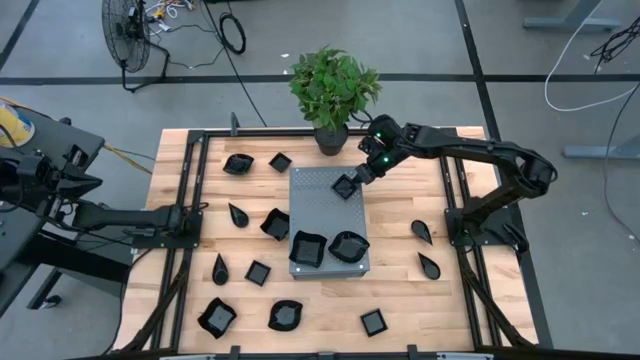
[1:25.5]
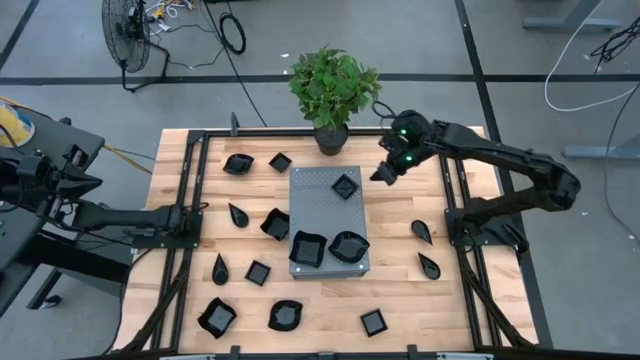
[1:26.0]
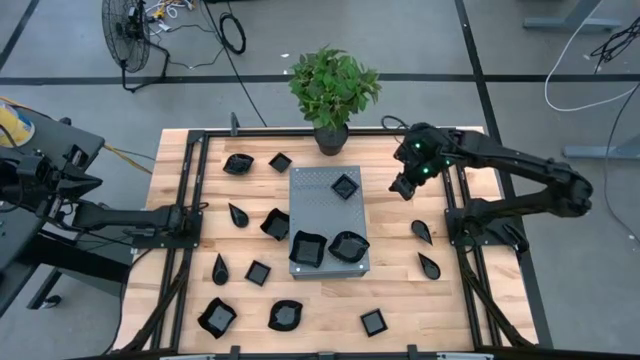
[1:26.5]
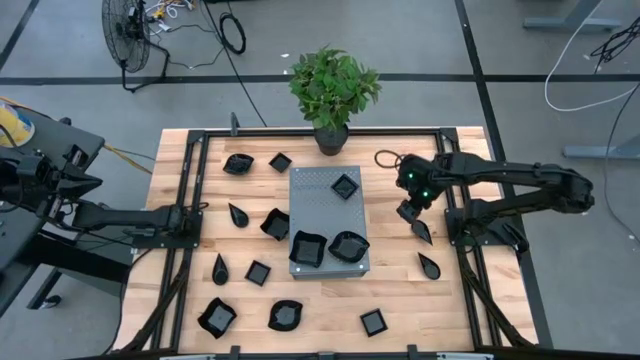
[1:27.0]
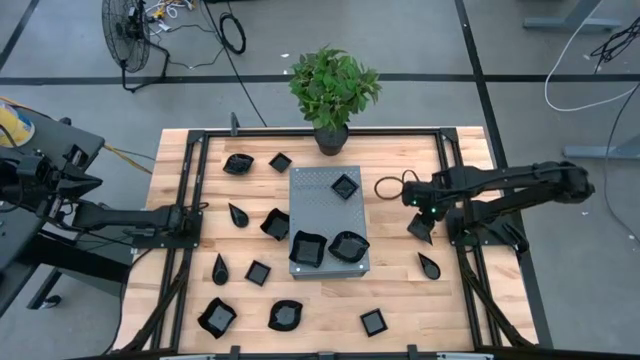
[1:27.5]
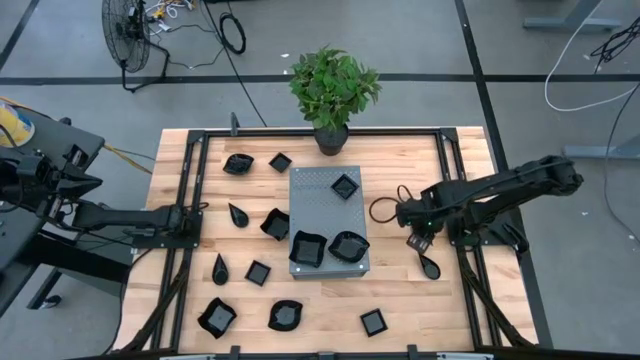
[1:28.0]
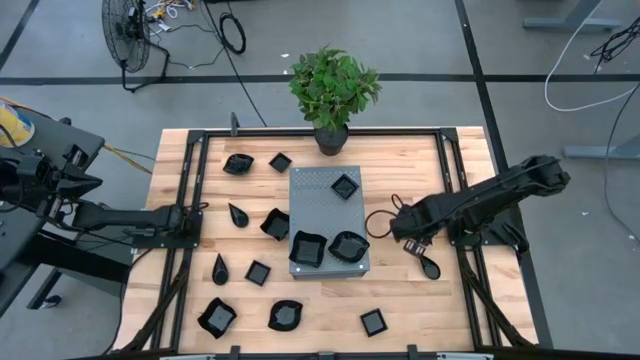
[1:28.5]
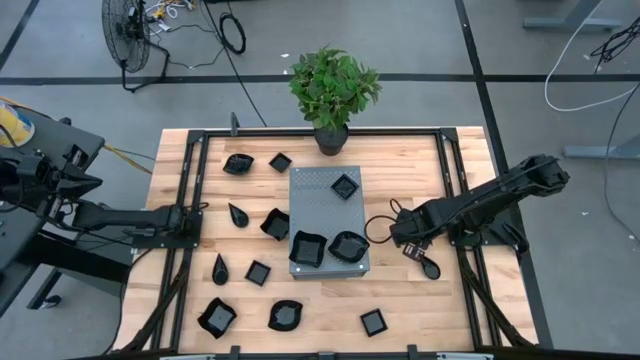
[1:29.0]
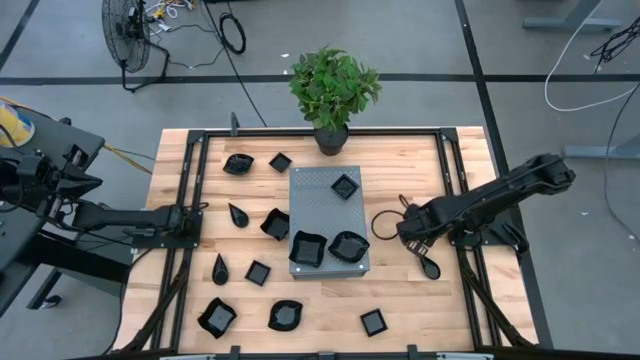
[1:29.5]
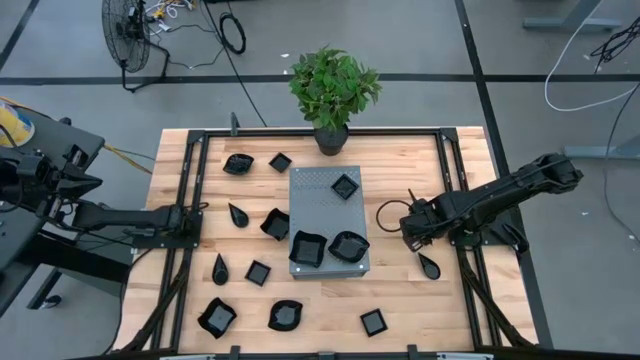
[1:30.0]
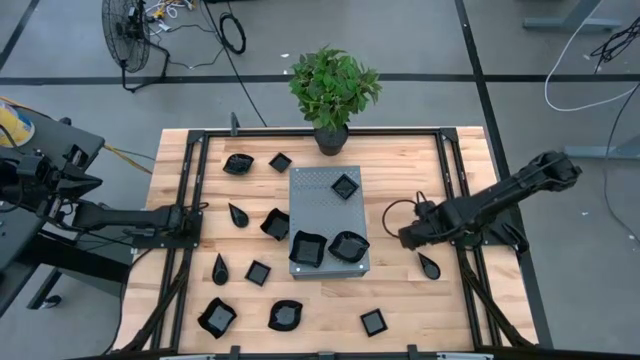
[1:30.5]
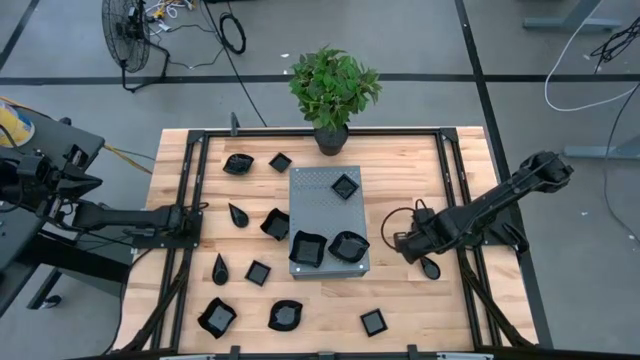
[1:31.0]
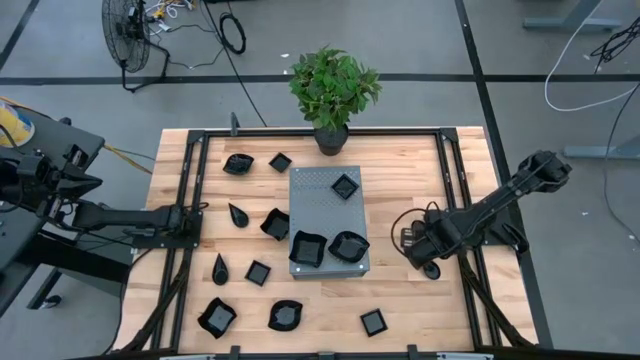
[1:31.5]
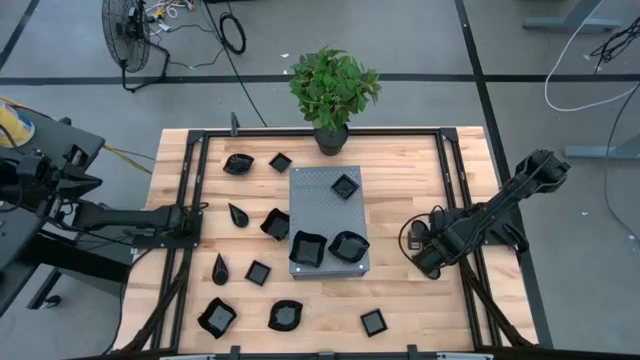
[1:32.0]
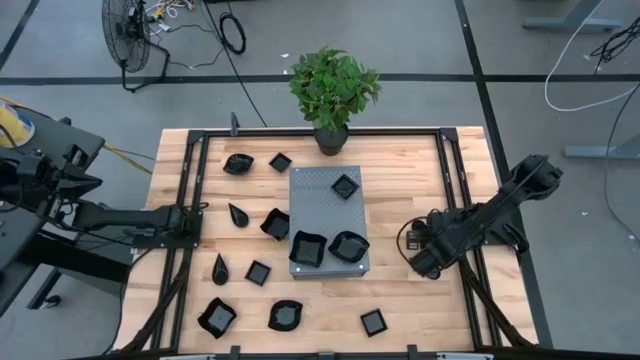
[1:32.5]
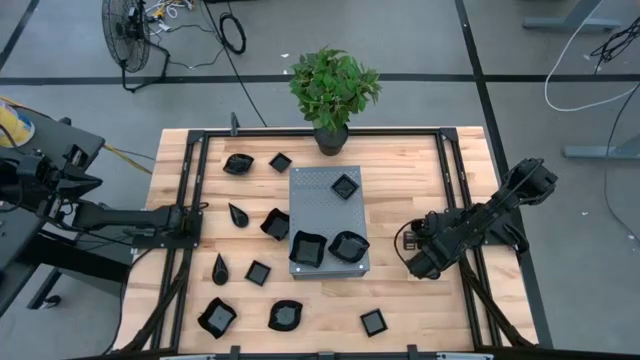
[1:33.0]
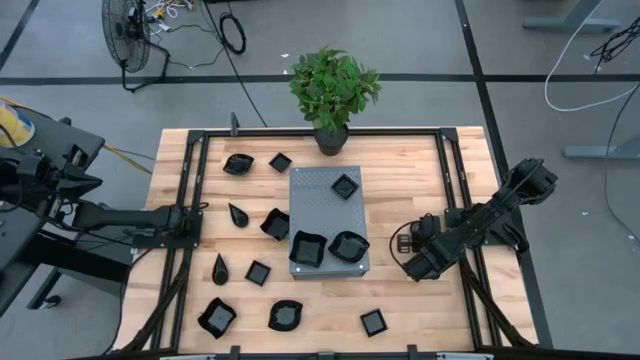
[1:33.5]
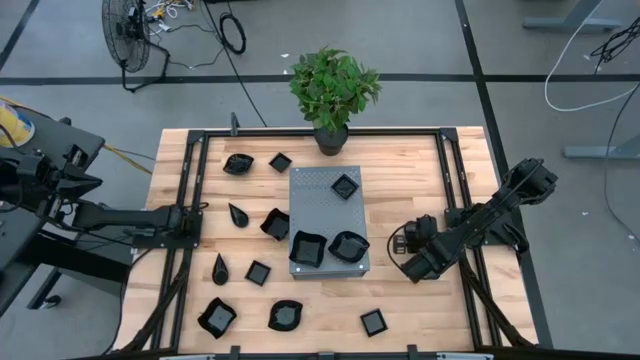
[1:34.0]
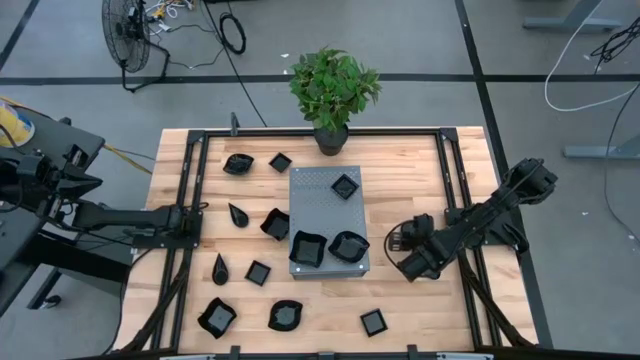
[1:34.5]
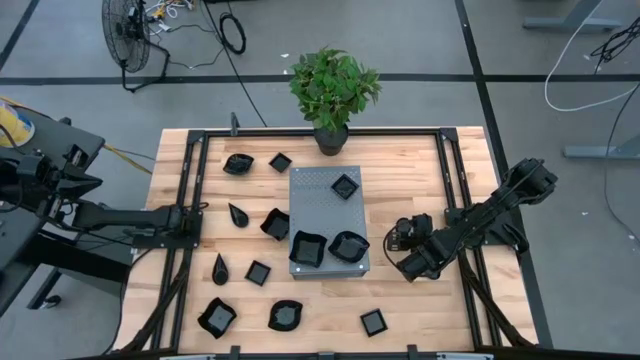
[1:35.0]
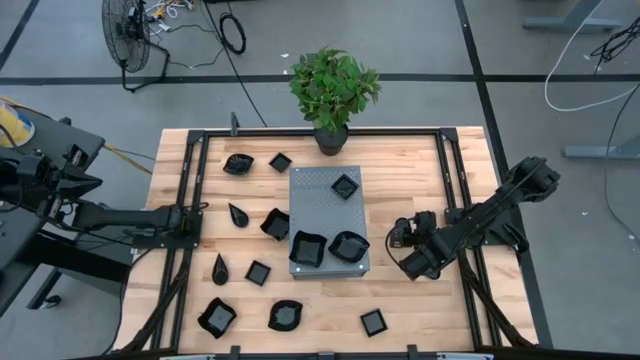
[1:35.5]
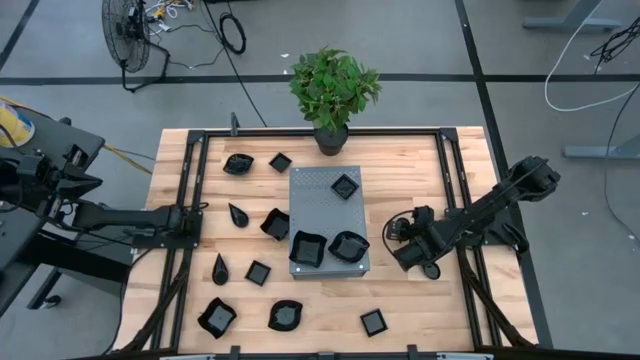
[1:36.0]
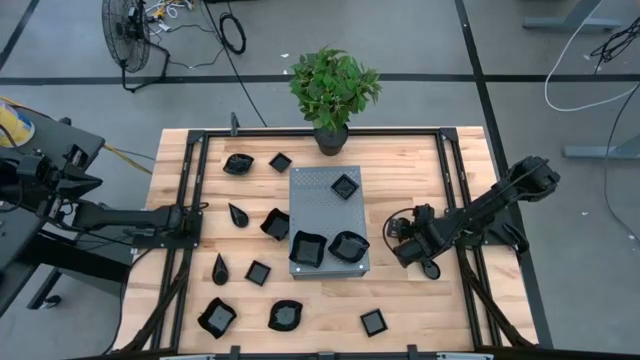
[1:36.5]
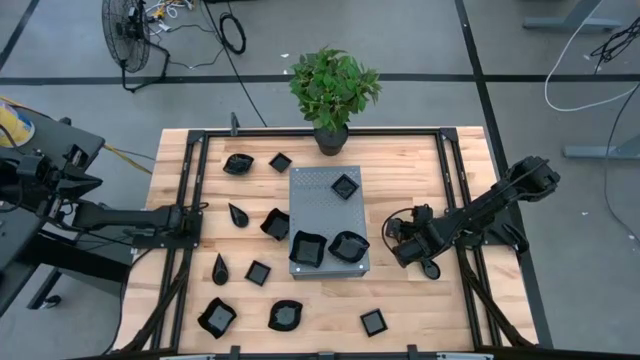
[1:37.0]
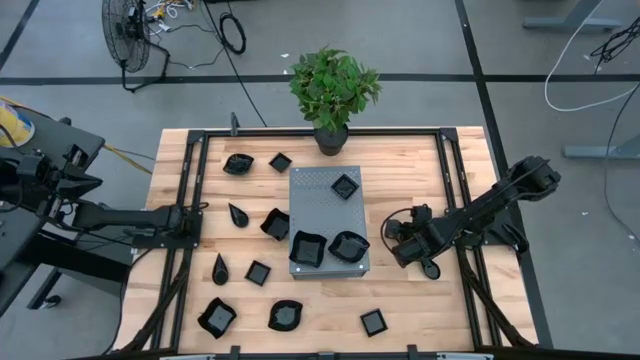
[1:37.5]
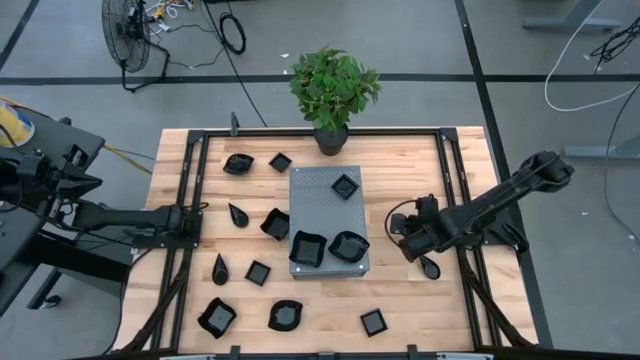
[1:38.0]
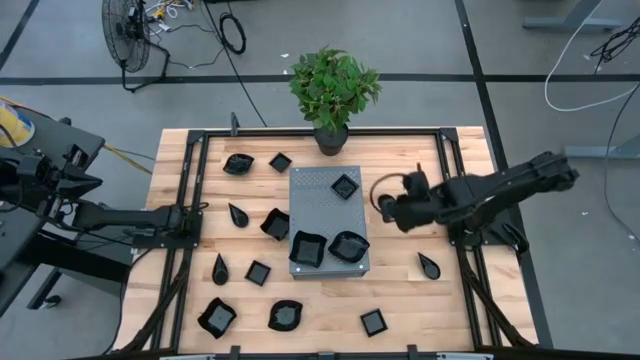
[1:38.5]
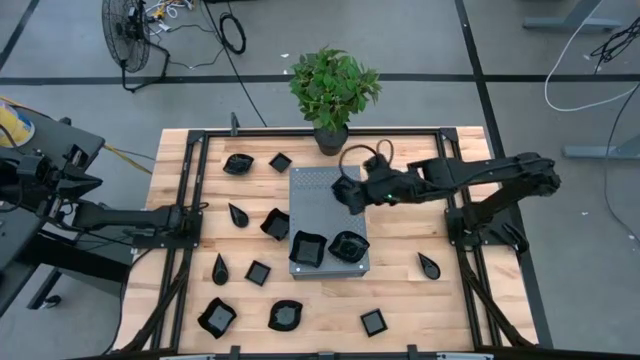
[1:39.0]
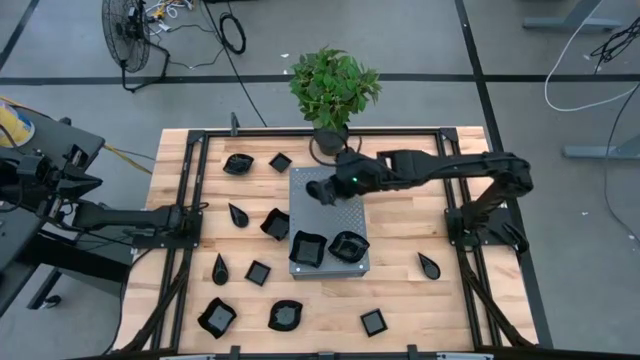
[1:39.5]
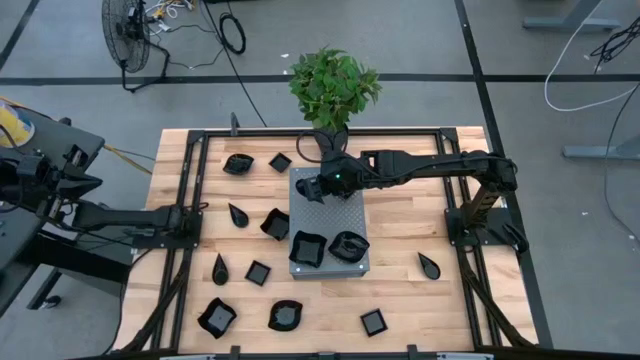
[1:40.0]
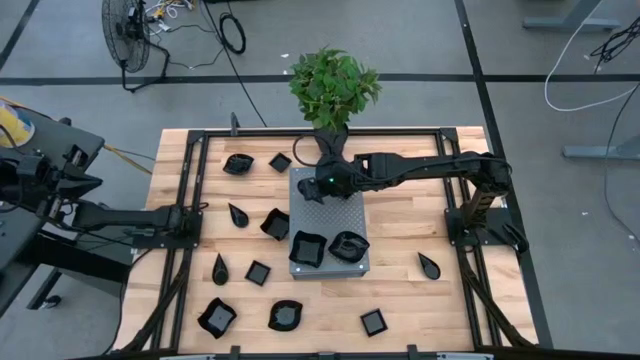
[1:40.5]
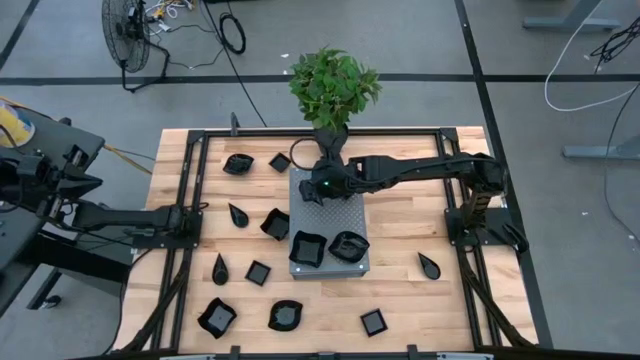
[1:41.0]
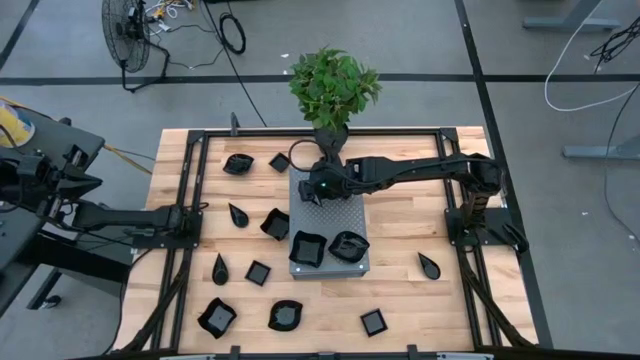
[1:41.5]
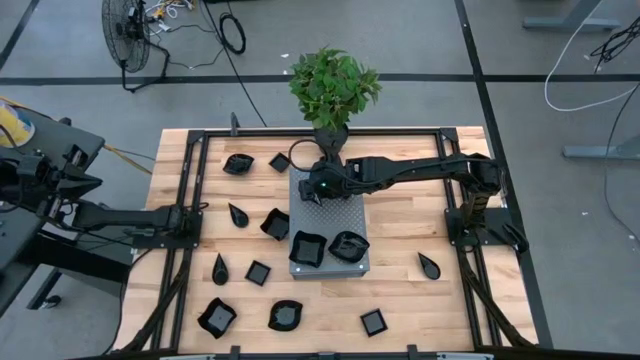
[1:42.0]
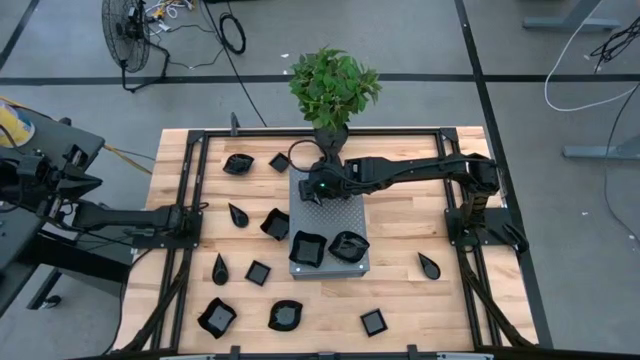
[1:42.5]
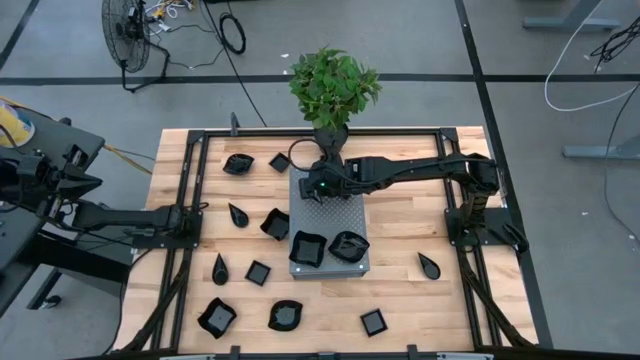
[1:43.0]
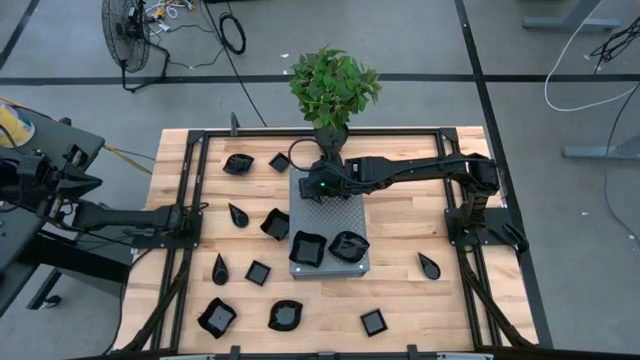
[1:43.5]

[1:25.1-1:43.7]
Task: Pick & Place Mini shaped plates
Put the black bowl on the shelf

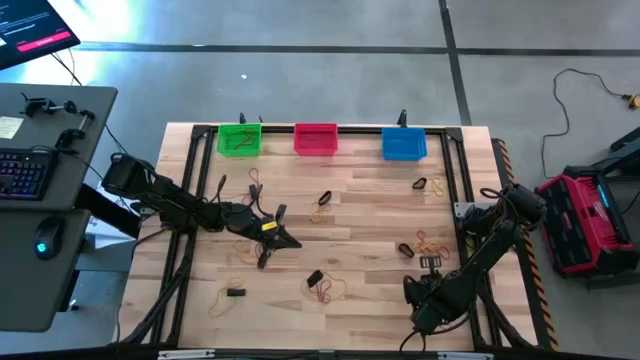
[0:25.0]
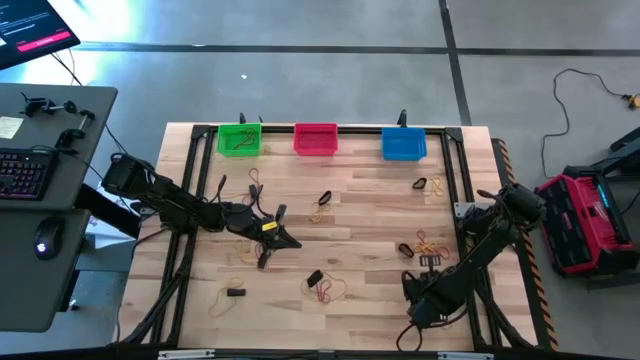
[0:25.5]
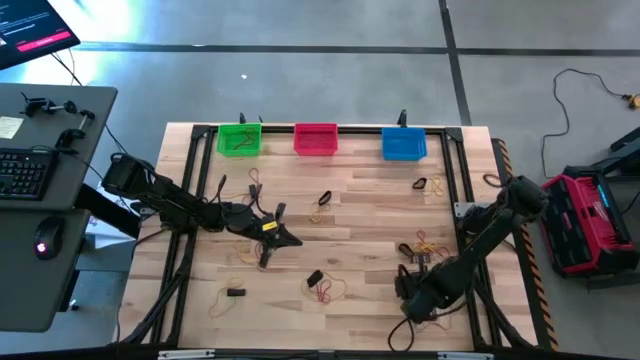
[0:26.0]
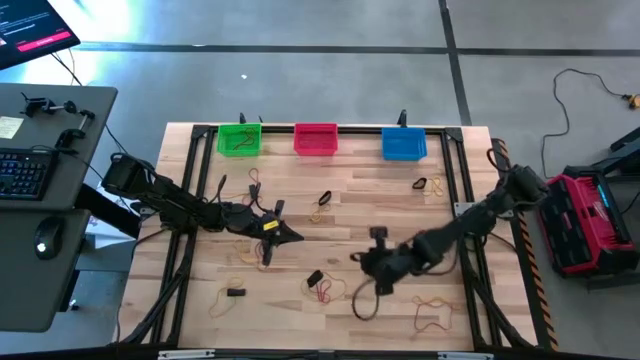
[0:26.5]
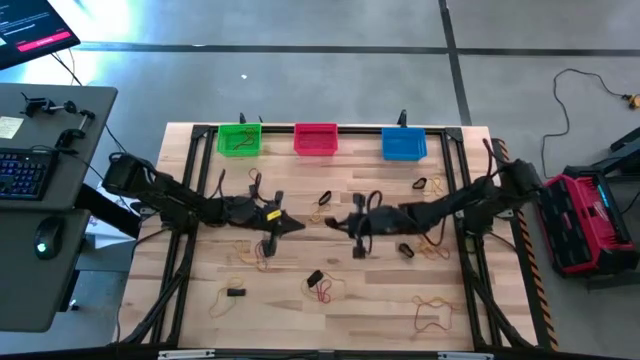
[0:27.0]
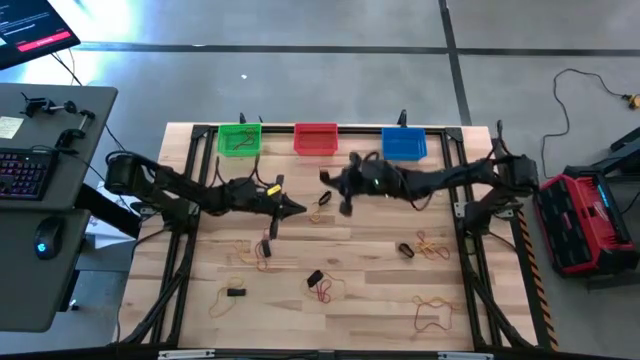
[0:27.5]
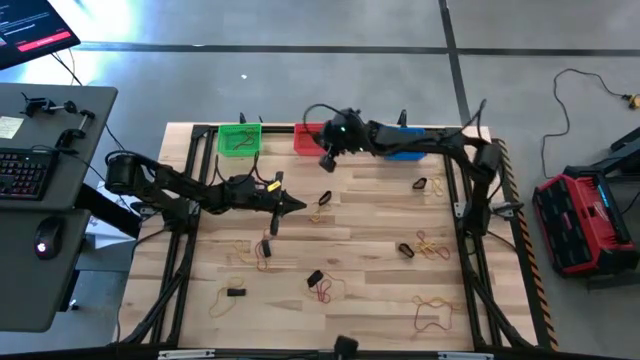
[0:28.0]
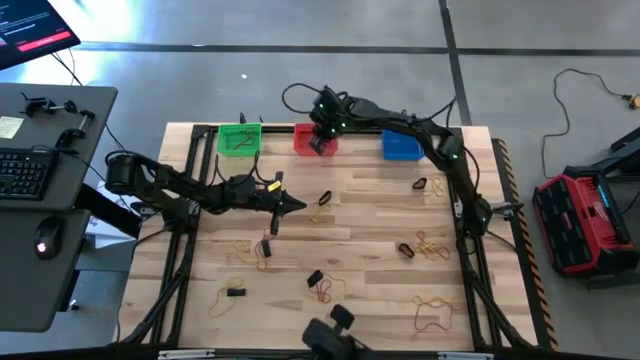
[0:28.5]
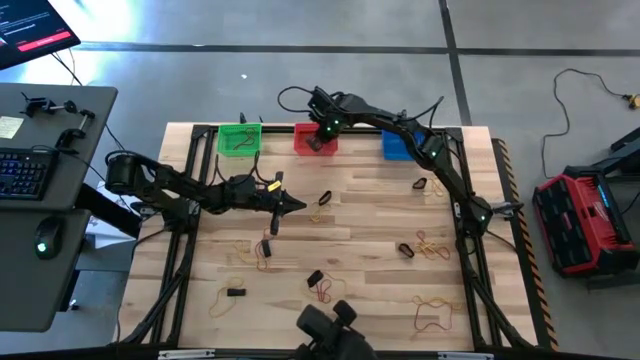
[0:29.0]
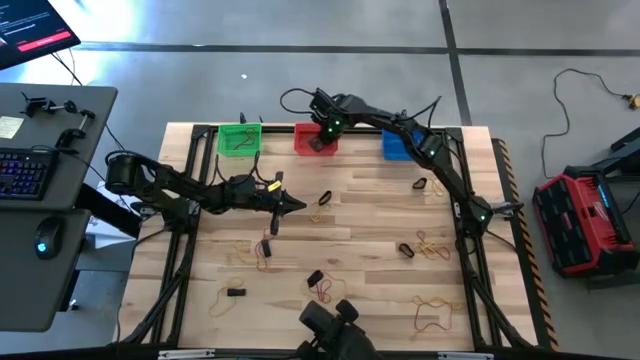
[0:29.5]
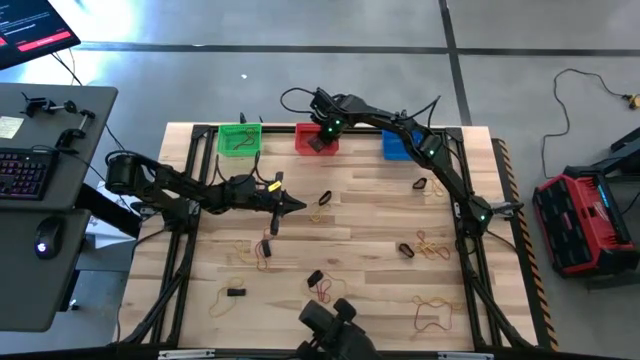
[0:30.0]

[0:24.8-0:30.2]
Task: Sort rubber bands into baskets
Put the black rubber band into the red bin
